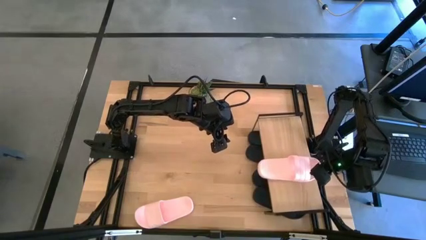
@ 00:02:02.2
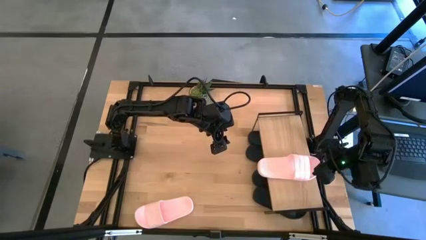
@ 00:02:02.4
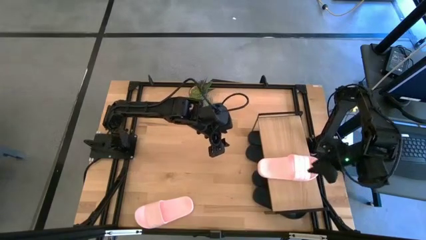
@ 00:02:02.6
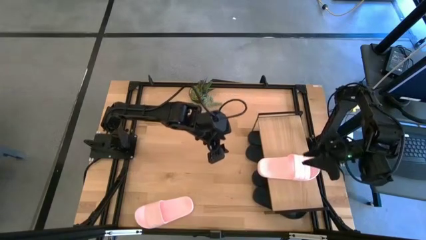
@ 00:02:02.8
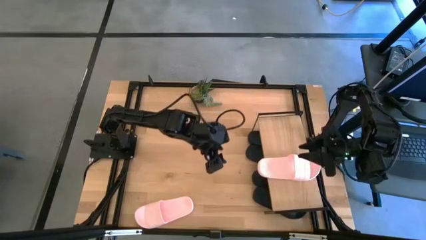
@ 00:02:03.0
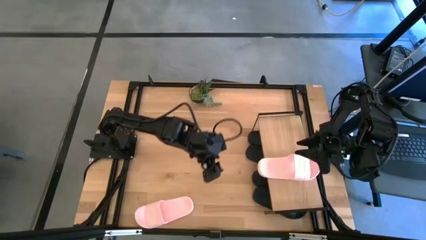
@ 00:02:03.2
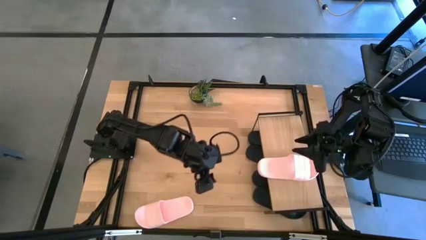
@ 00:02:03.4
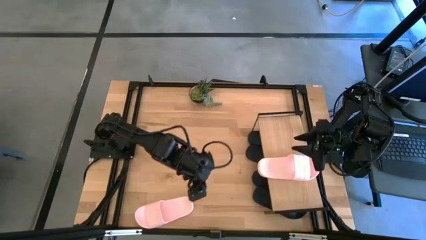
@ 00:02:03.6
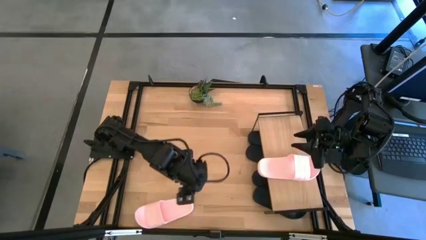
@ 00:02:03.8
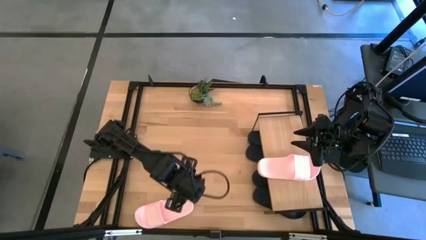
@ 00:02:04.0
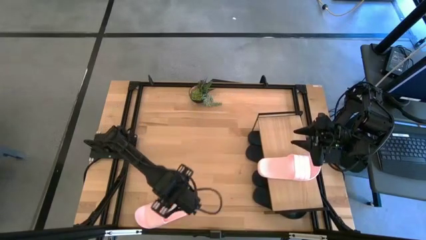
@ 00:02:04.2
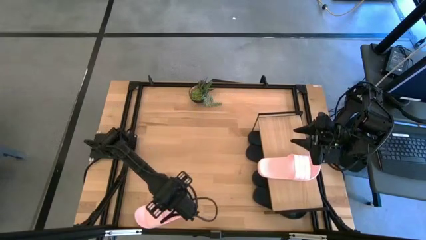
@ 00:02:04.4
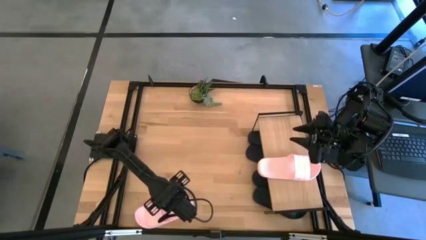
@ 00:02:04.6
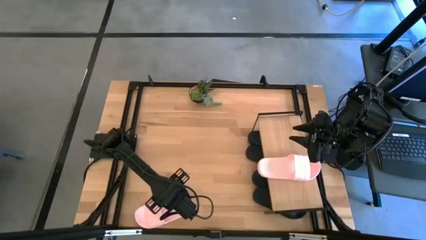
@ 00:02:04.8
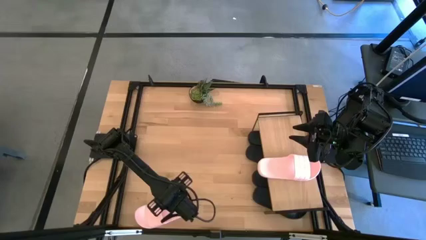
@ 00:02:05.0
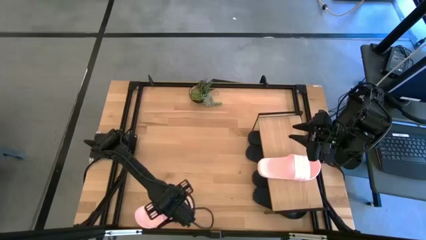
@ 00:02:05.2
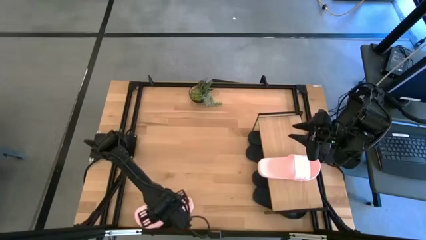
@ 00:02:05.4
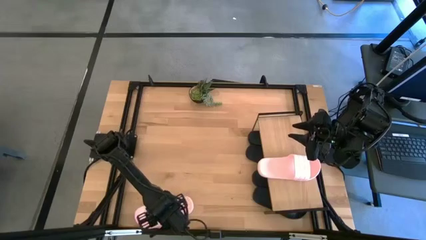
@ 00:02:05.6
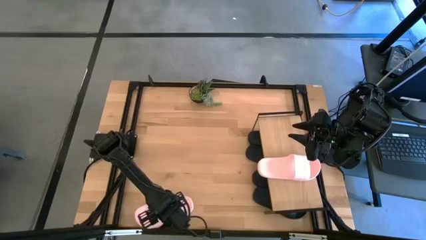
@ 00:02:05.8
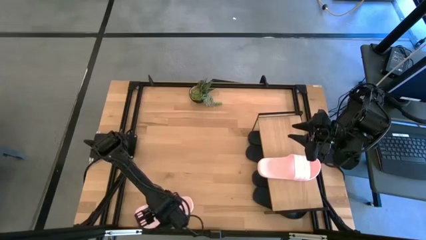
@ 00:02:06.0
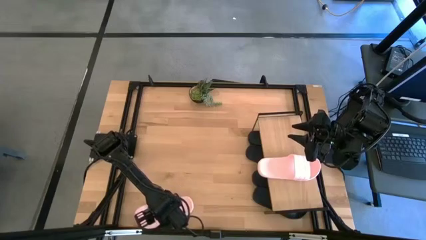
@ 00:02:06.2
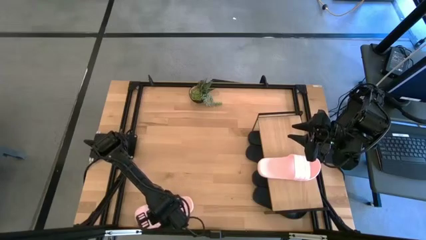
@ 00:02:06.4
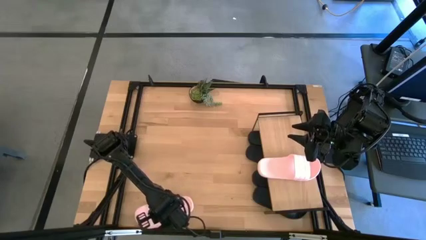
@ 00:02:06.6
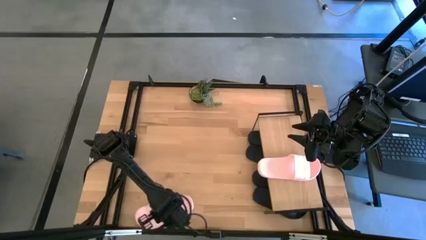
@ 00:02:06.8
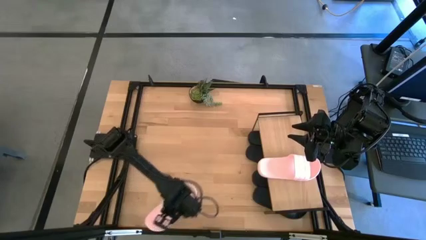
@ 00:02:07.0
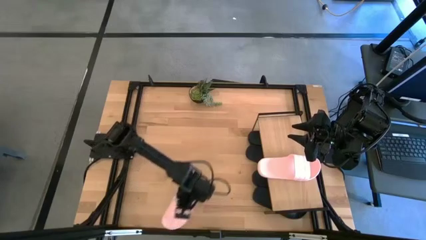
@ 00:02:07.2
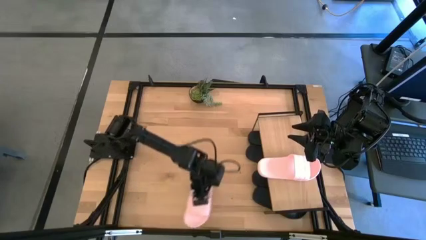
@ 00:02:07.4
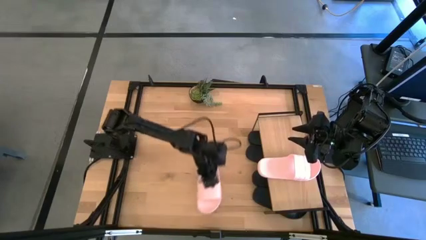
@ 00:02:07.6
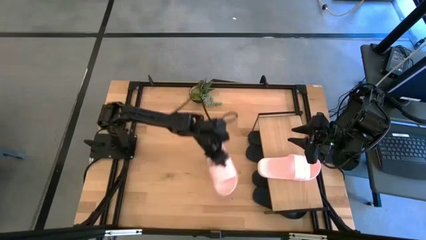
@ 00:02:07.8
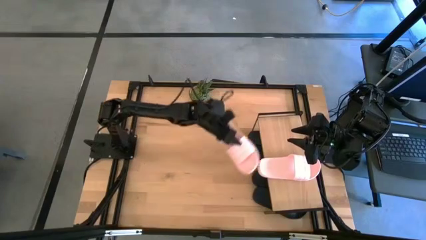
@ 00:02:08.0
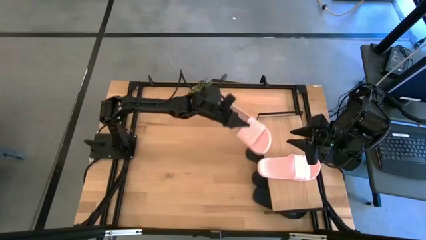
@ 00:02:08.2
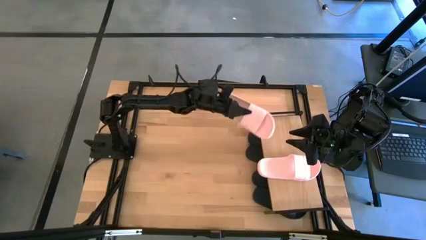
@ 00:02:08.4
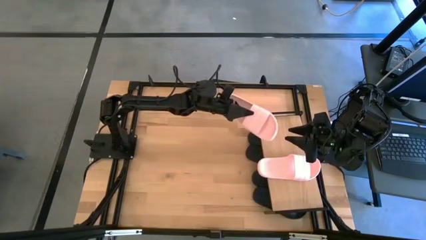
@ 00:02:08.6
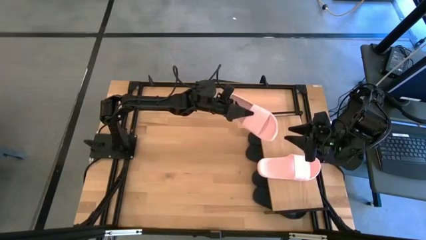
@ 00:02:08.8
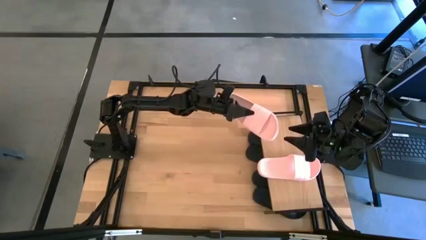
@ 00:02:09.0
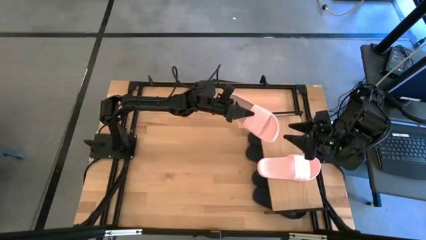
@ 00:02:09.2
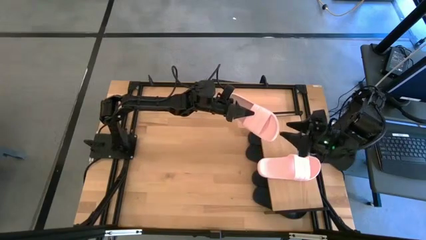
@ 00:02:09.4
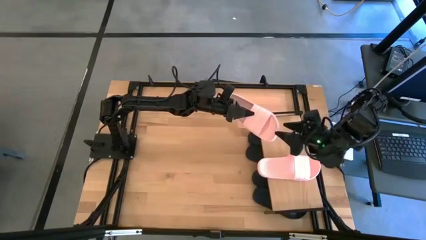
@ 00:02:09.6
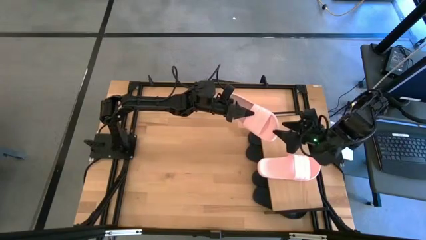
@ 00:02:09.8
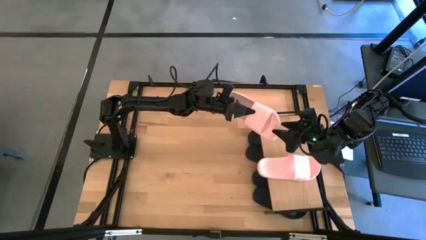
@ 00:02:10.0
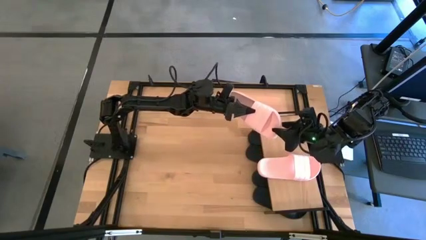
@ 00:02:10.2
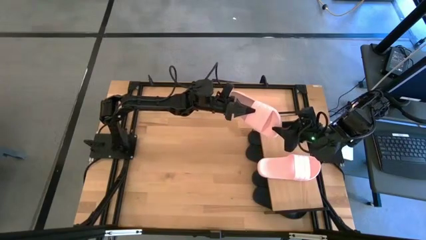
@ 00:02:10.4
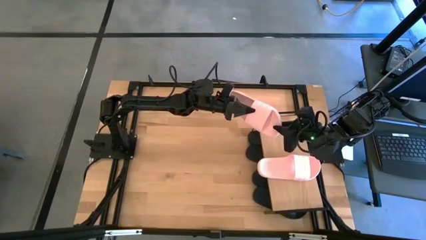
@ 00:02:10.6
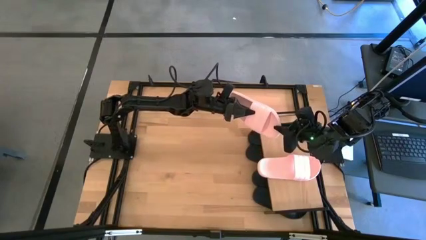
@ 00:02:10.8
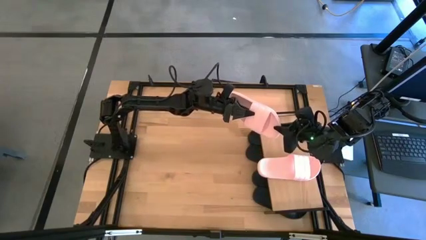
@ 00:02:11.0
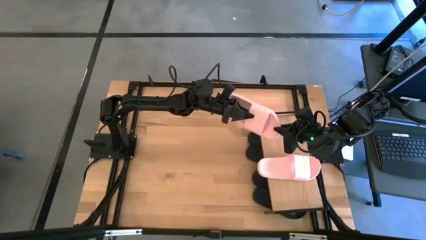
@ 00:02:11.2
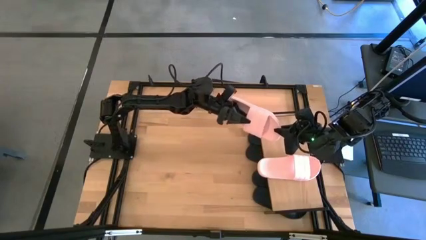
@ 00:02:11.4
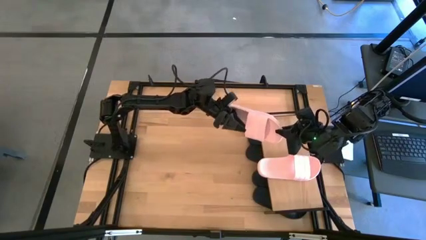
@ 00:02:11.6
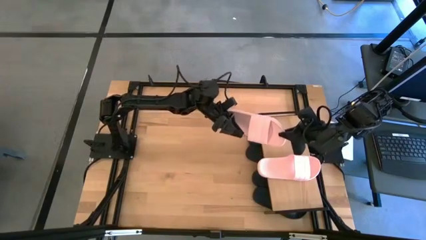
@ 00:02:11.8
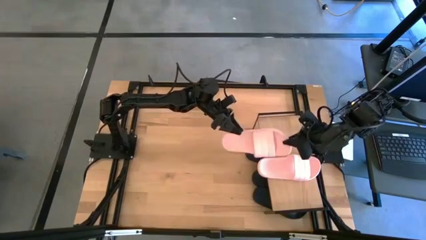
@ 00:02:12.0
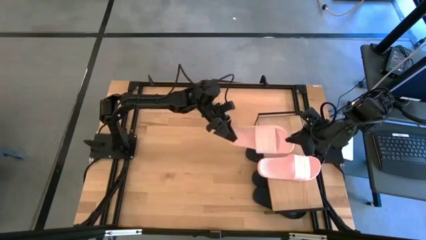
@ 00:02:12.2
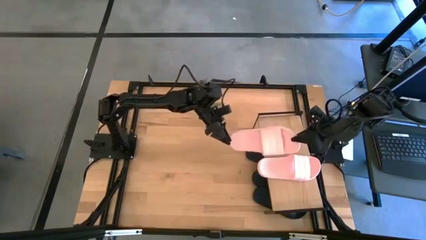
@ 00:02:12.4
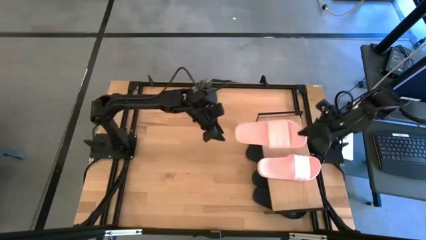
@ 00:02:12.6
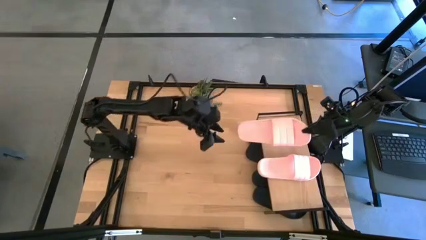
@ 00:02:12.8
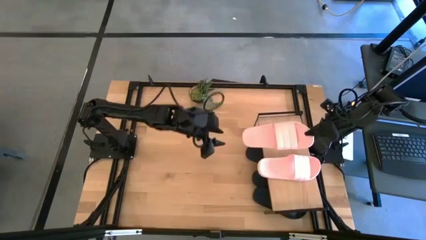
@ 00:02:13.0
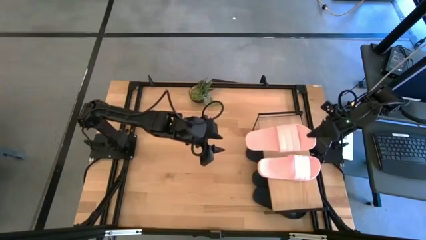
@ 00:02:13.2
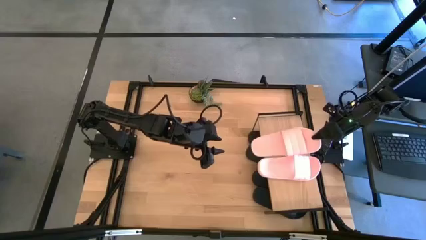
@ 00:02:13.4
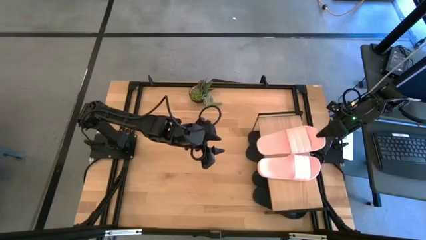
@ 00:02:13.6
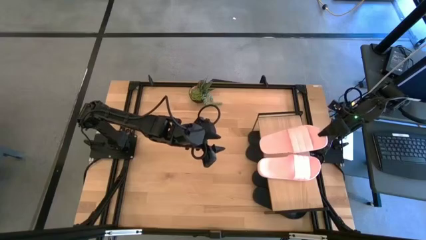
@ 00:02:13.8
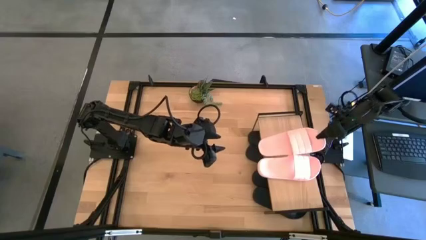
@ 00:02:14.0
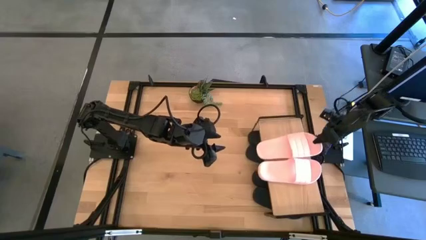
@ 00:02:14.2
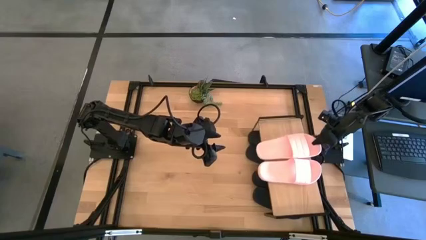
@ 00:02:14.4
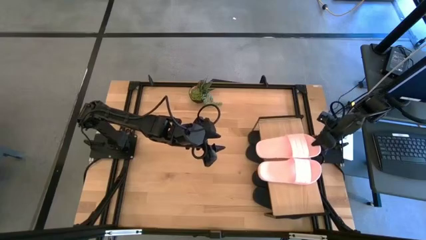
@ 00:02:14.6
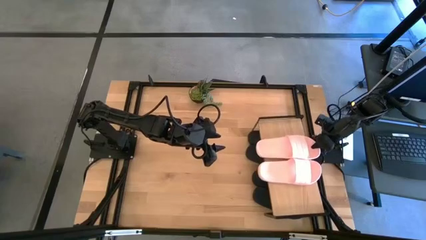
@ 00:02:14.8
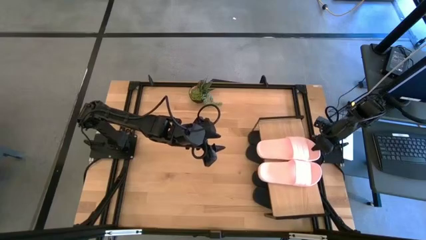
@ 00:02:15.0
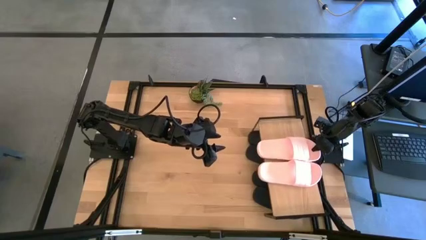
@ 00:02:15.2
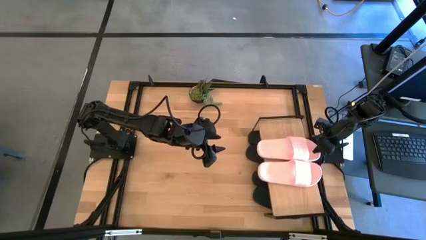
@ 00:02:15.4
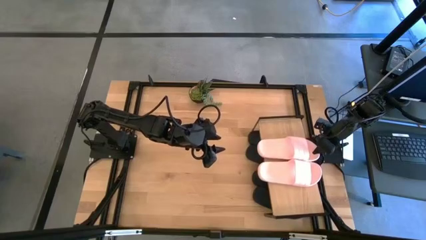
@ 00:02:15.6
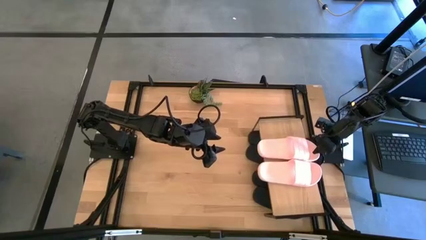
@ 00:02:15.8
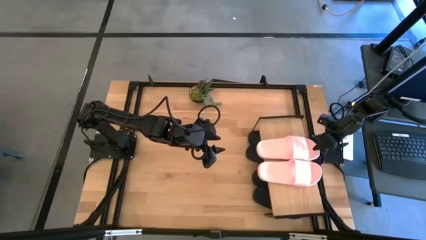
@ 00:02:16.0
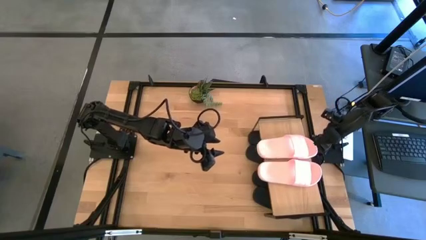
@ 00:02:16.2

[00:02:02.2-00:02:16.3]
Task: Pick and place slides into the shelf
Put the pink slides on the shelf
